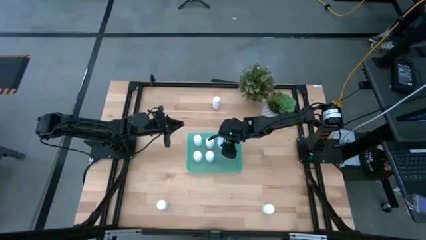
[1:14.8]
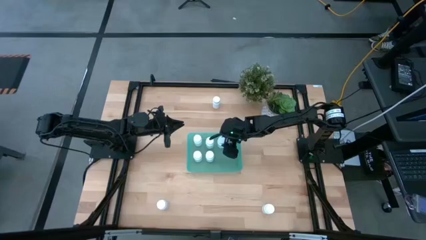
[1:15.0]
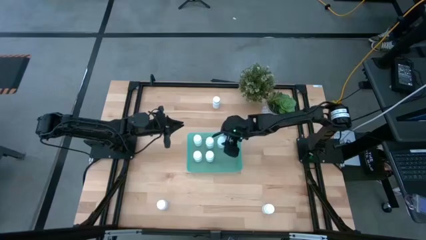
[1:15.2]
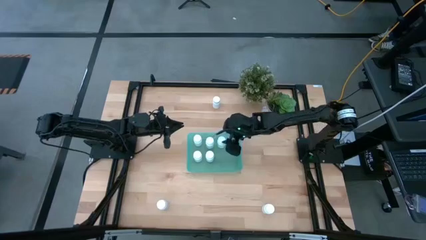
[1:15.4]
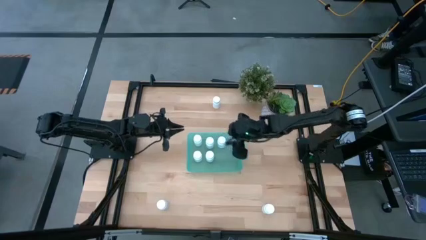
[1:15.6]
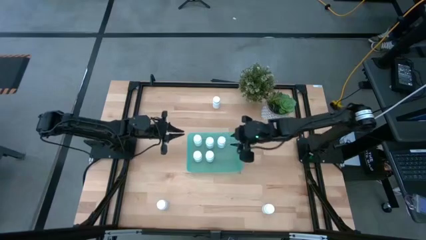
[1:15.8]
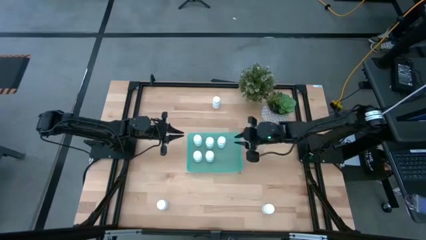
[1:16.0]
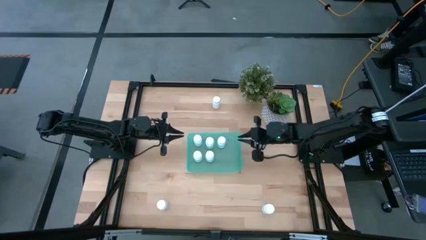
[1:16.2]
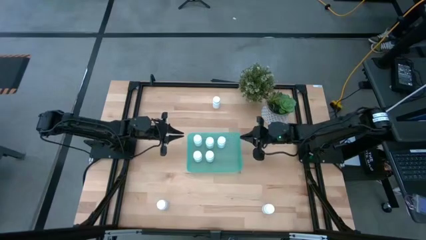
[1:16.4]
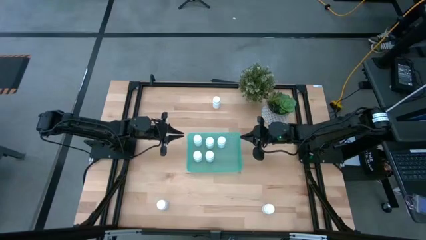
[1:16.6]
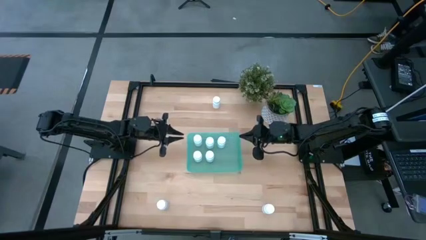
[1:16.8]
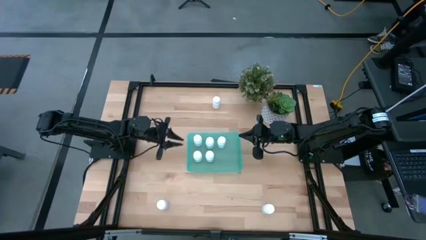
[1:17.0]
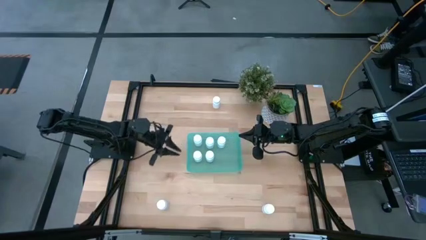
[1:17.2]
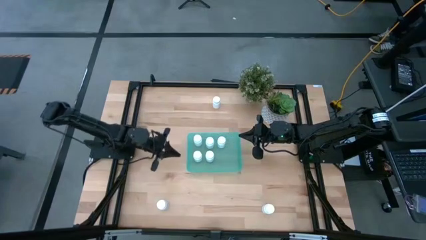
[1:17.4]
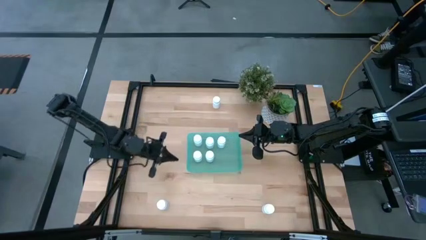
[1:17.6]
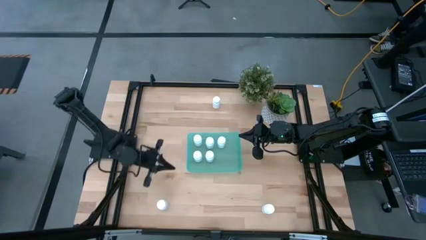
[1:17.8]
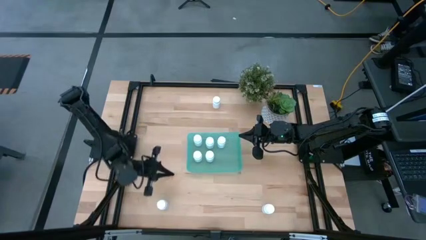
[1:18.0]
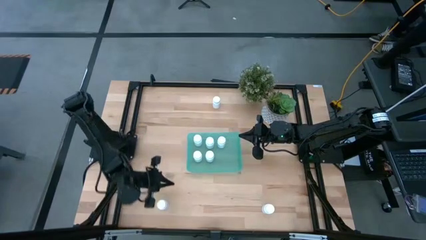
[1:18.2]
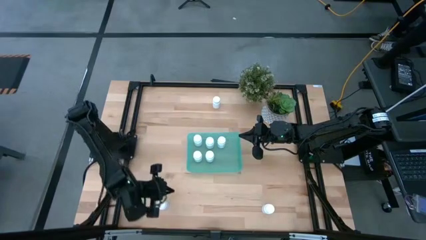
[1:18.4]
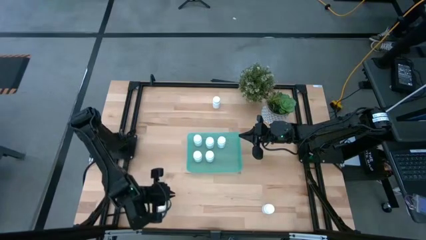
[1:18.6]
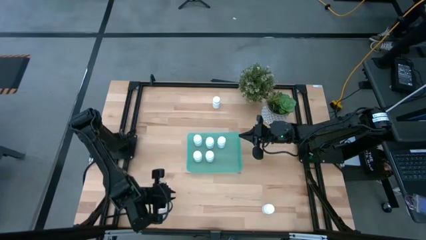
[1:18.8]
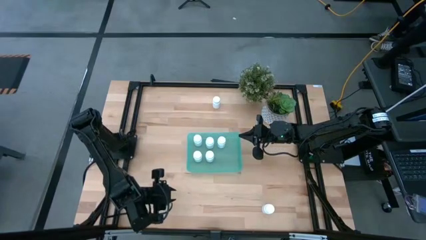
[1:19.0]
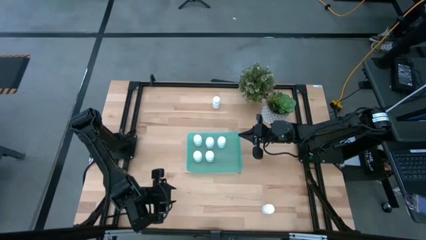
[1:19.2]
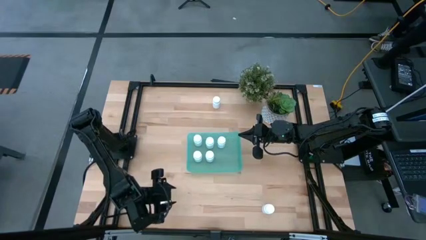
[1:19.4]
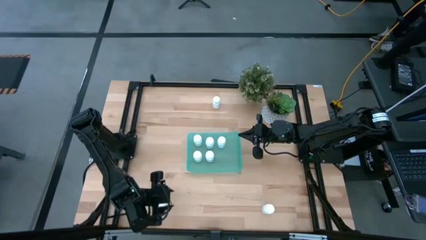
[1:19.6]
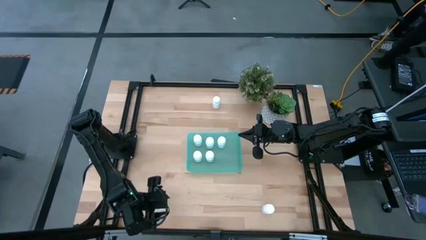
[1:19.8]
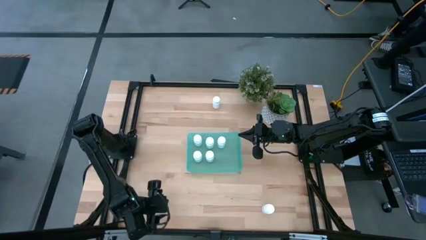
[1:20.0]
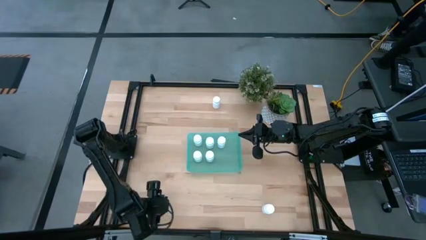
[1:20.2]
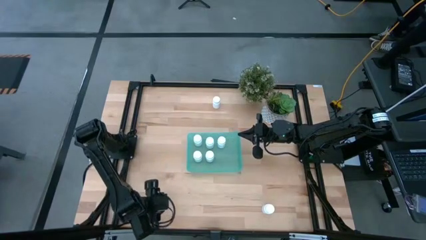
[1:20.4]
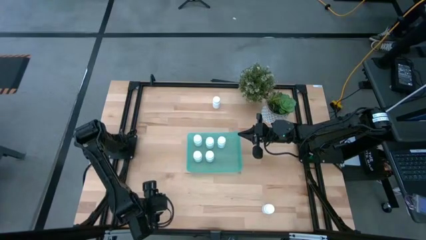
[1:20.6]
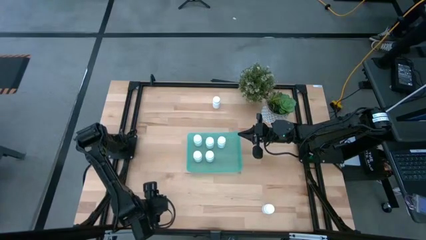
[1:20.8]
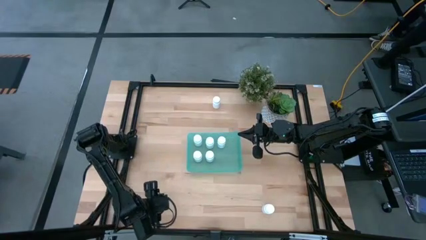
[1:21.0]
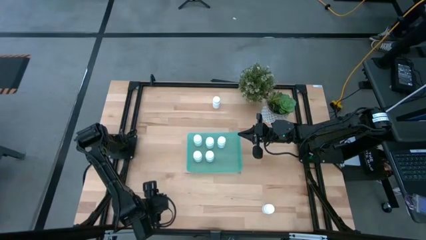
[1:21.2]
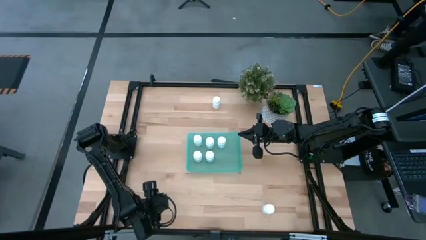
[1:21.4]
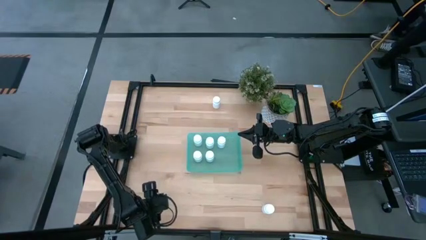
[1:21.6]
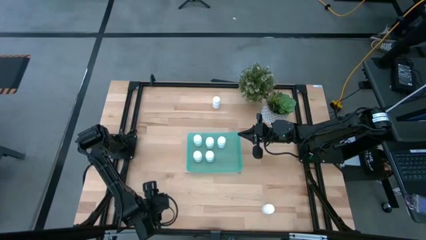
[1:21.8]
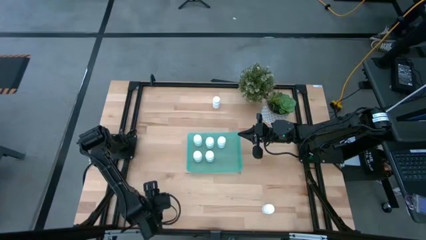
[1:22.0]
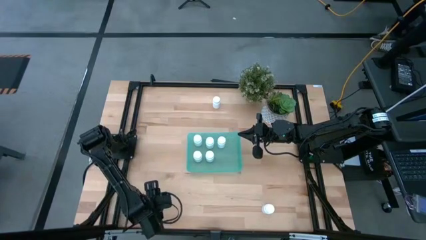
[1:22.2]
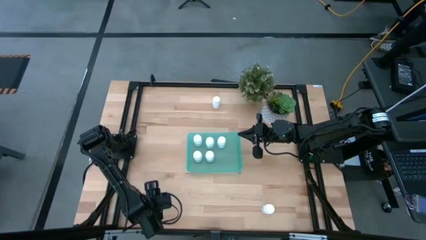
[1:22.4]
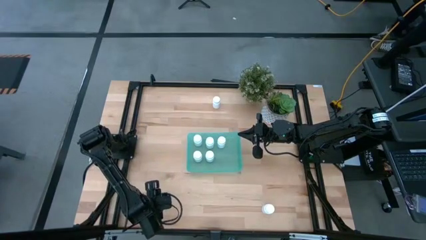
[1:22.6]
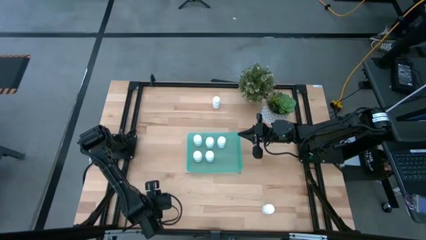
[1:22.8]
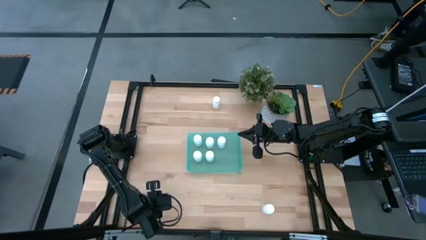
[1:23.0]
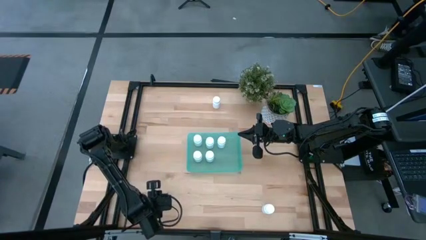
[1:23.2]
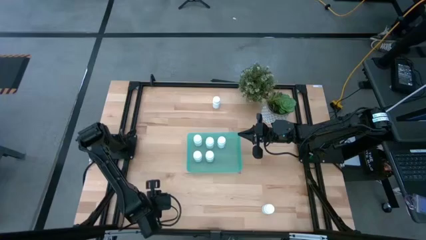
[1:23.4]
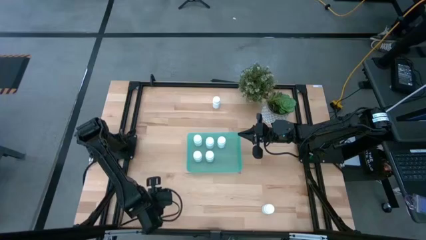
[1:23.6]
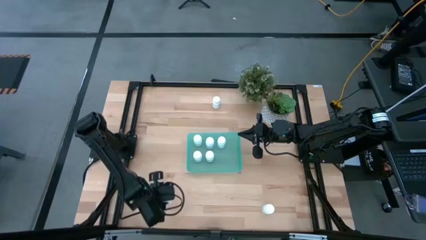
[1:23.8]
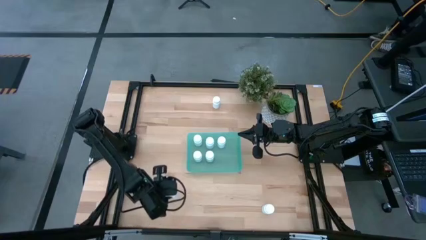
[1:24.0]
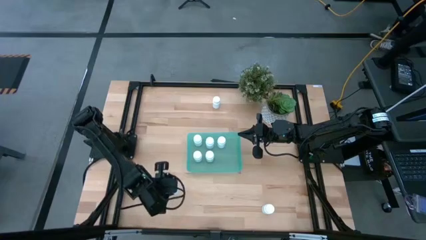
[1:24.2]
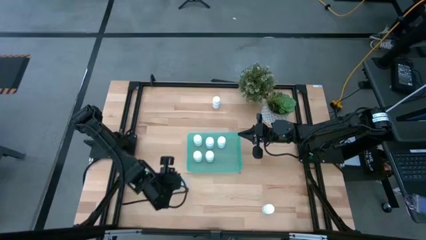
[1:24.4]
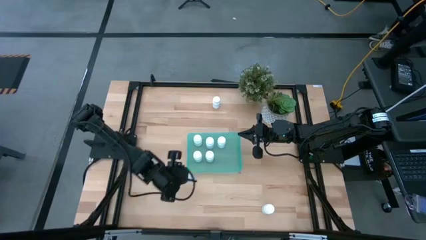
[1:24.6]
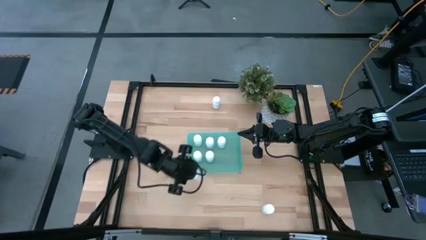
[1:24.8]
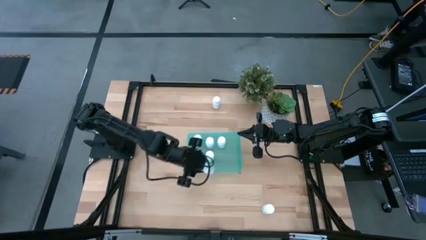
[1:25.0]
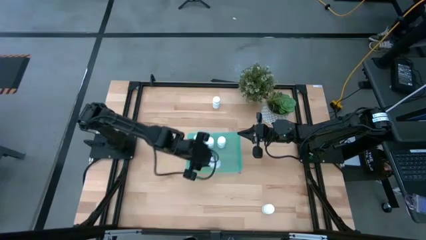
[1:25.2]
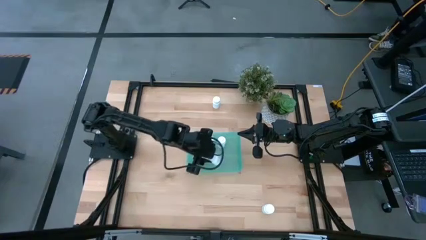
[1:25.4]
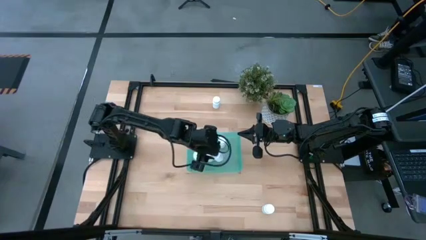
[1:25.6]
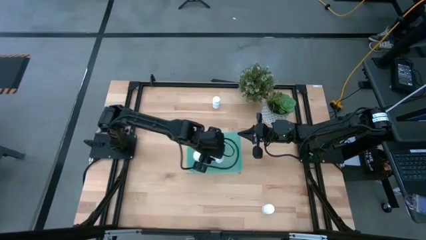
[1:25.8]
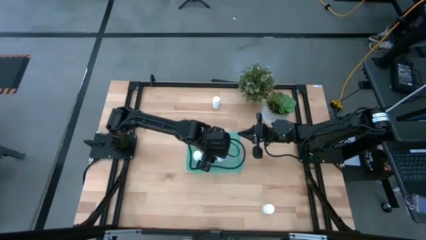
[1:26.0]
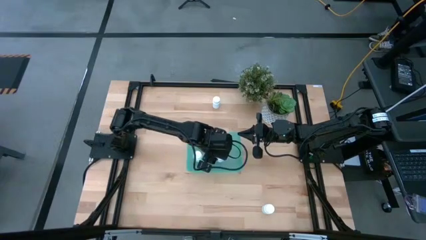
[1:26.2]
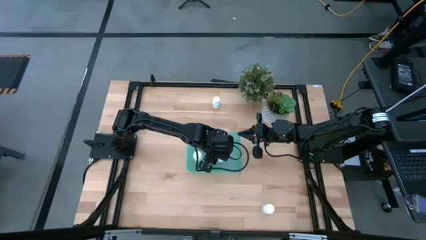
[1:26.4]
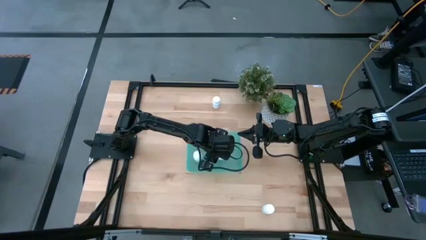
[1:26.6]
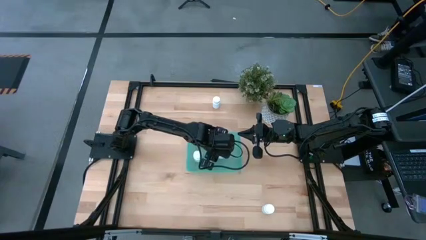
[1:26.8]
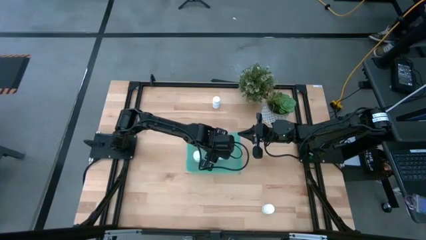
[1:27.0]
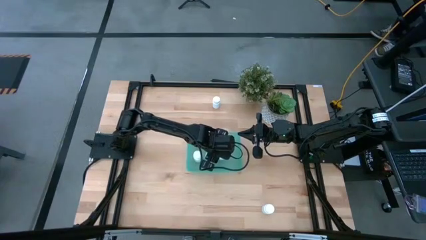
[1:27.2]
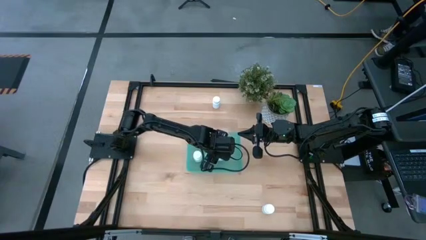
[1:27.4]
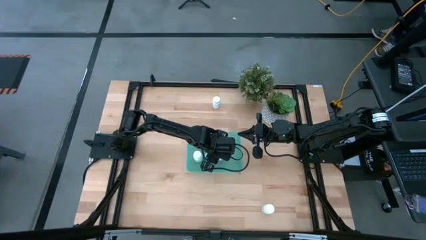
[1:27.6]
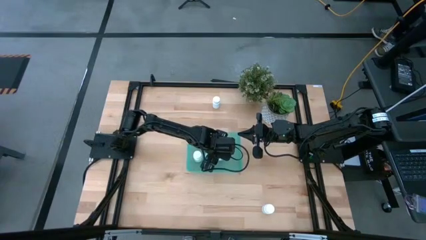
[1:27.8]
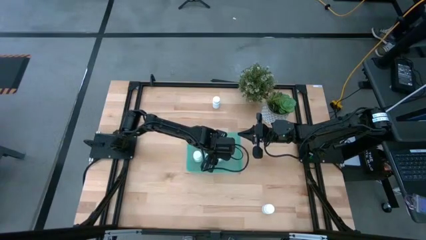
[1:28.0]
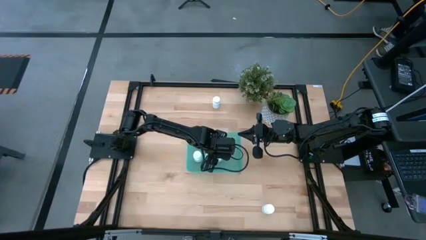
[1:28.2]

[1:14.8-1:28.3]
Task: Pick and place pill bottles into a basket
Put the white pill bottle into the blue bin

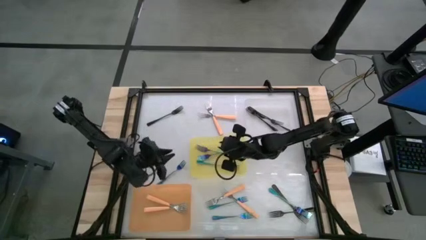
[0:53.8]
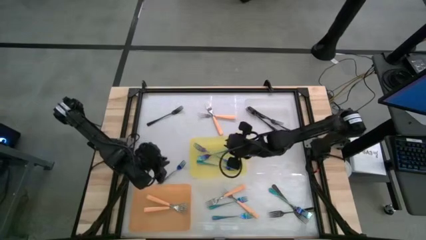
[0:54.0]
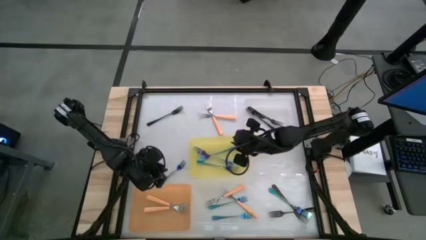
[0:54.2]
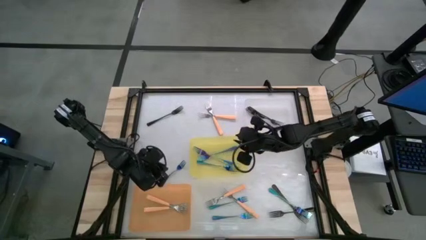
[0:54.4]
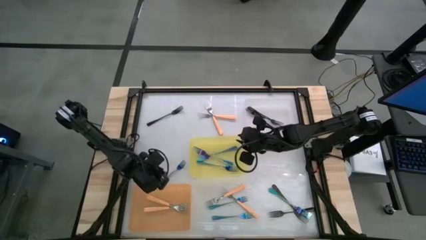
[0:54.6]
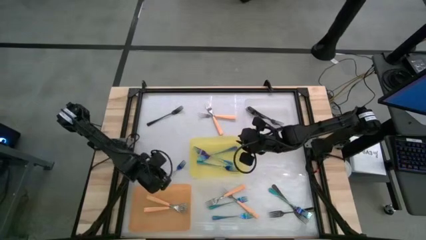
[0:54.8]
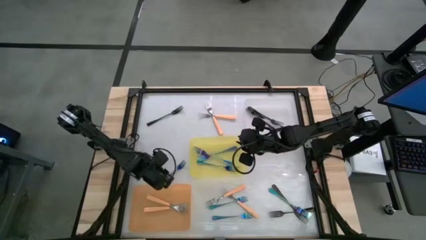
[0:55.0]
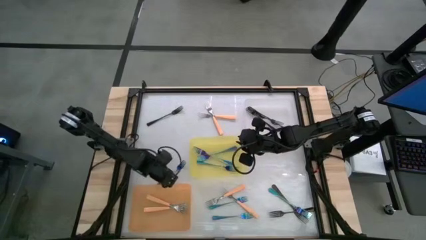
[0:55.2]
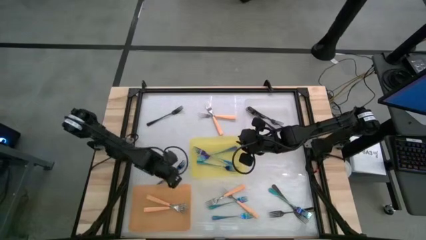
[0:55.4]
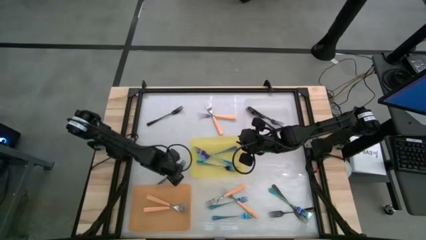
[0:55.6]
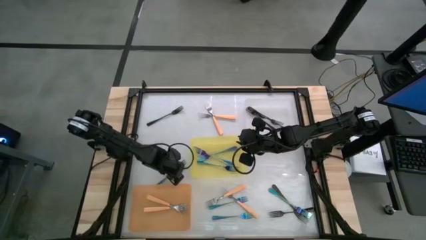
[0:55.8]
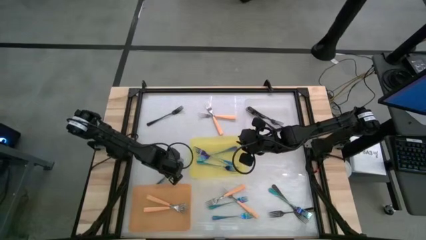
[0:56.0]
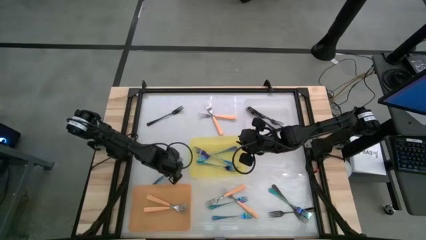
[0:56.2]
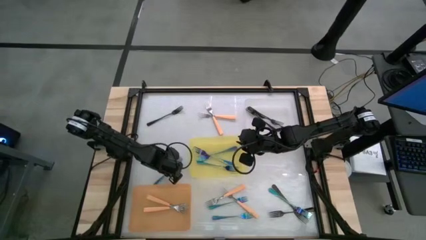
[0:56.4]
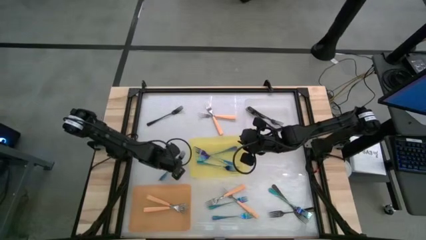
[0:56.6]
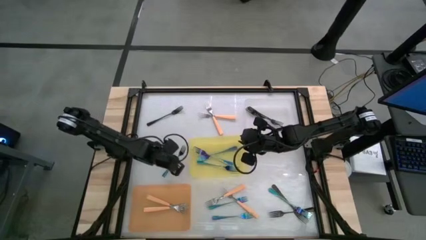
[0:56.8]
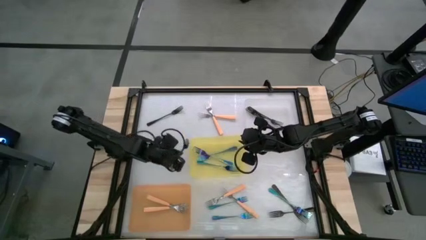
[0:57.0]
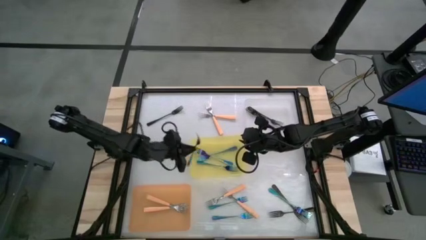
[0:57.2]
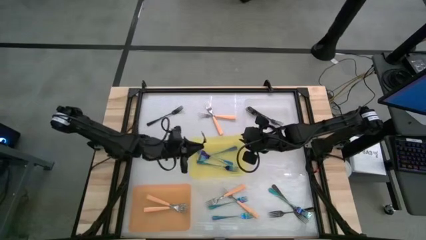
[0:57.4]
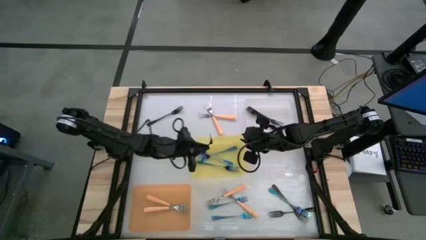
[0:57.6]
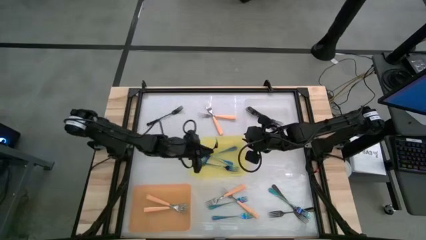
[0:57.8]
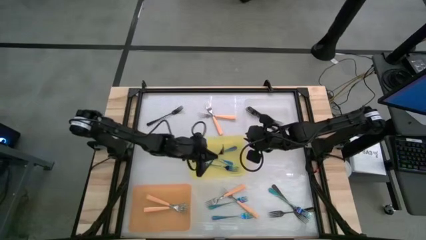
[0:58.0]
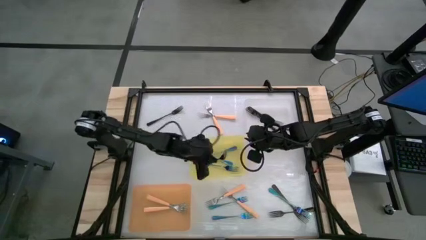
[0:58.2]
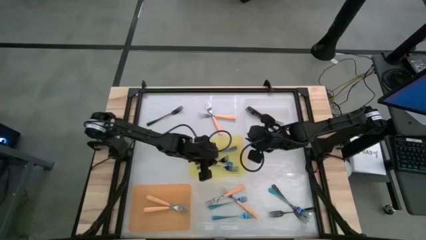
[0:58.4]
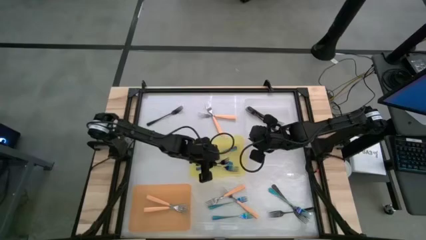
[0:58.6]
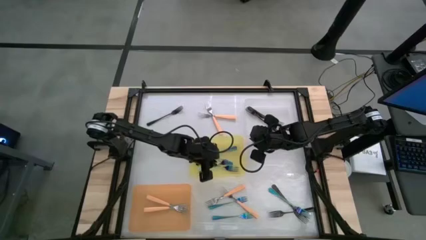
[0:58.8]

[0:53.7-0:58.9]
Task: Sort silverware by color (type)
Put the blue fork into the yellow bin
